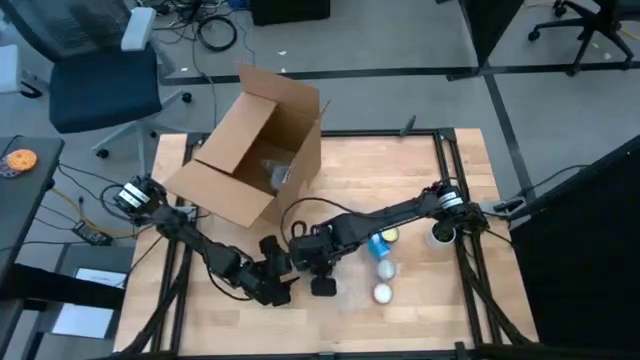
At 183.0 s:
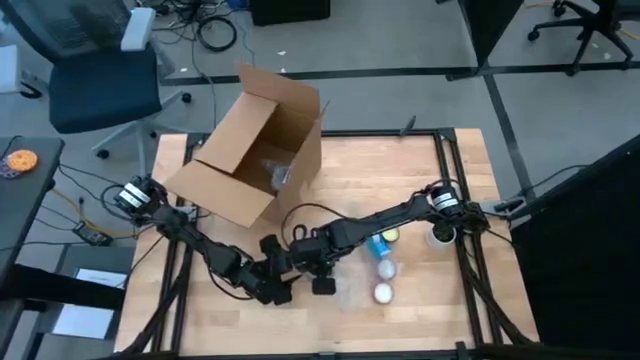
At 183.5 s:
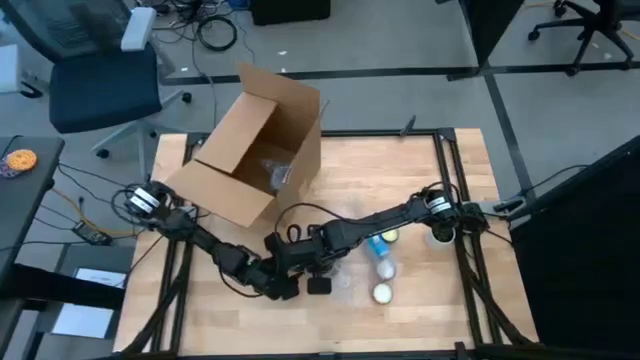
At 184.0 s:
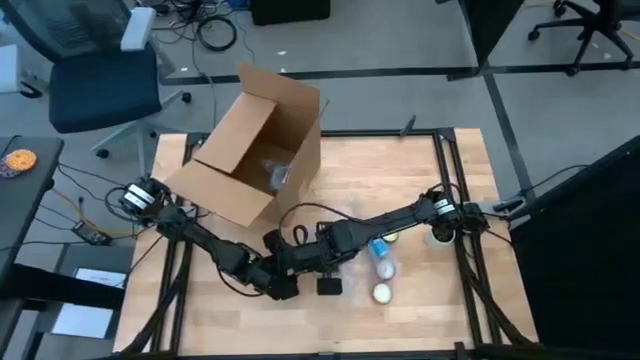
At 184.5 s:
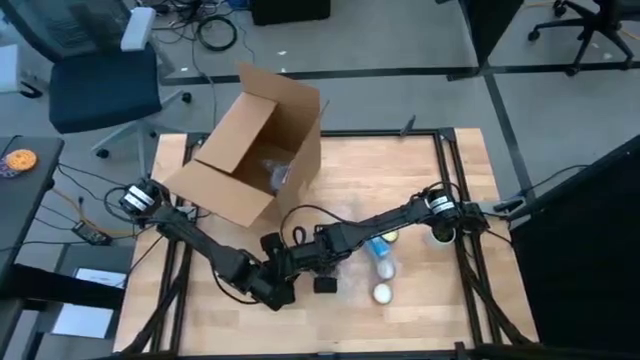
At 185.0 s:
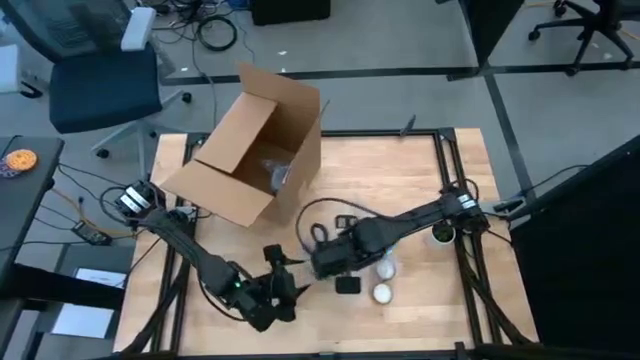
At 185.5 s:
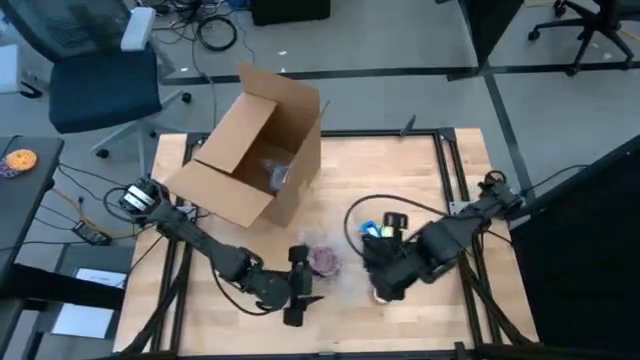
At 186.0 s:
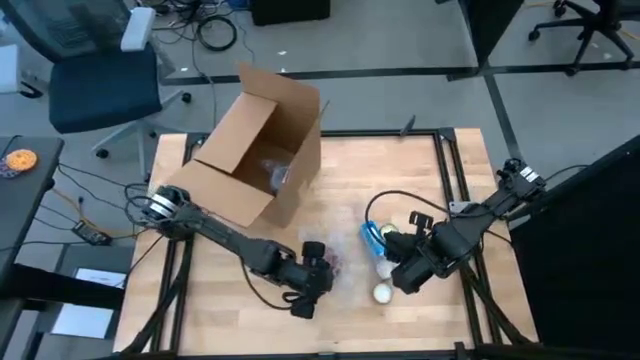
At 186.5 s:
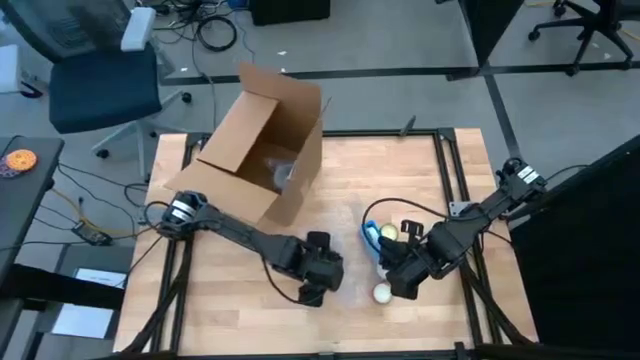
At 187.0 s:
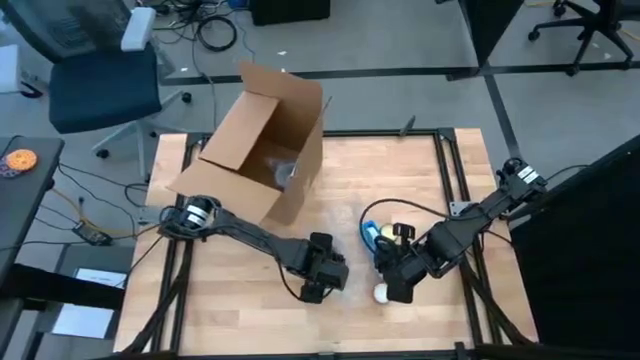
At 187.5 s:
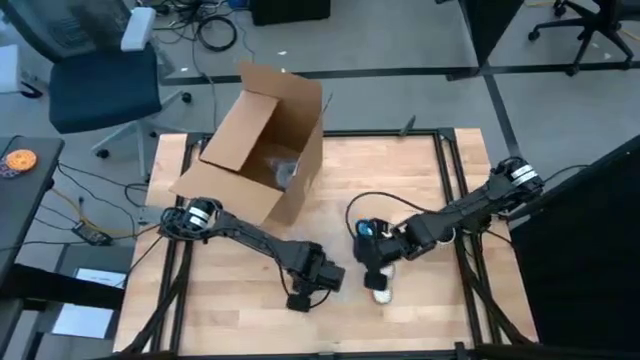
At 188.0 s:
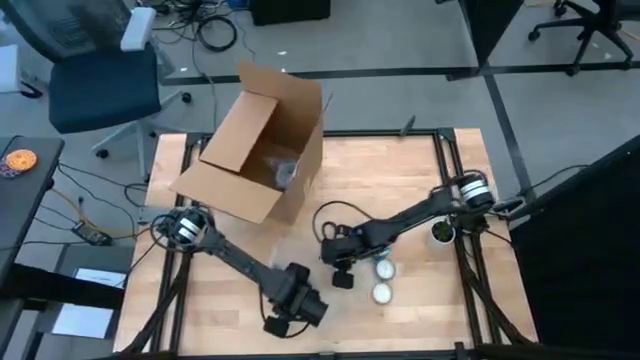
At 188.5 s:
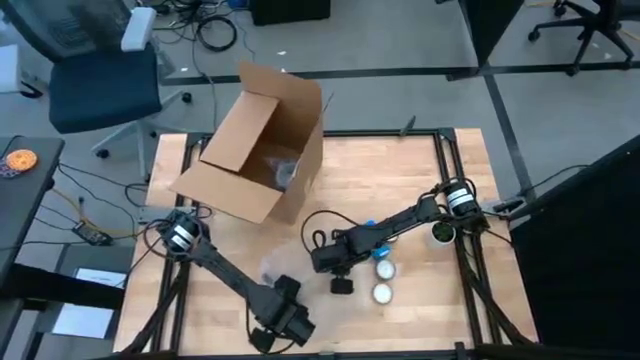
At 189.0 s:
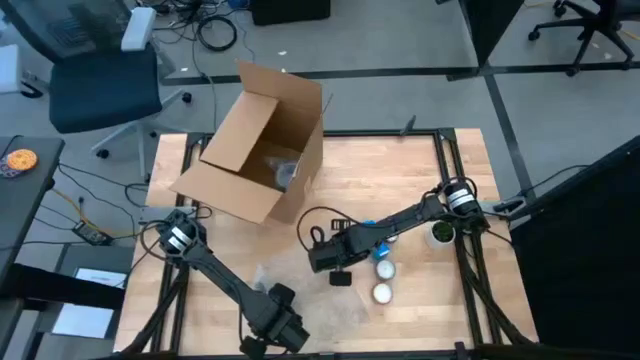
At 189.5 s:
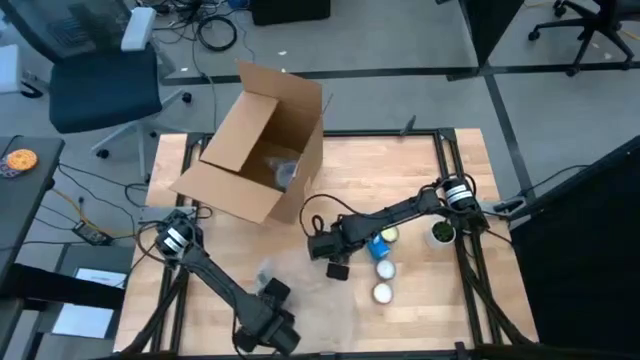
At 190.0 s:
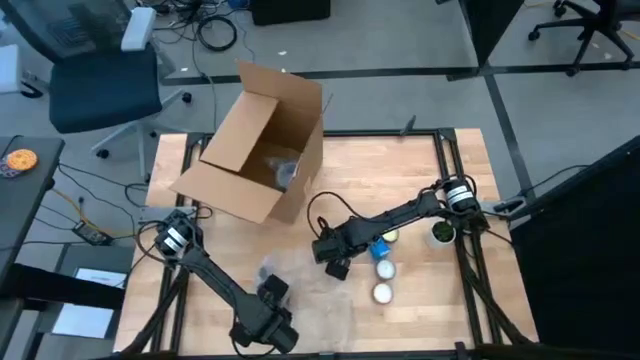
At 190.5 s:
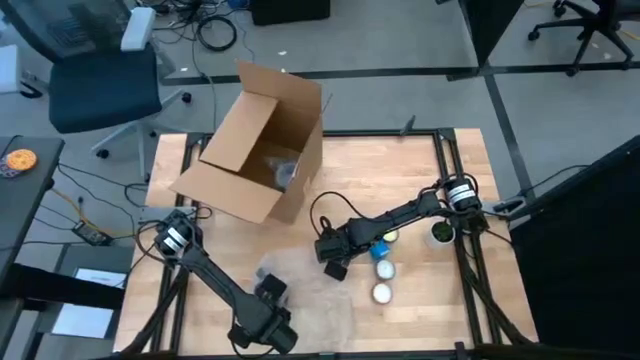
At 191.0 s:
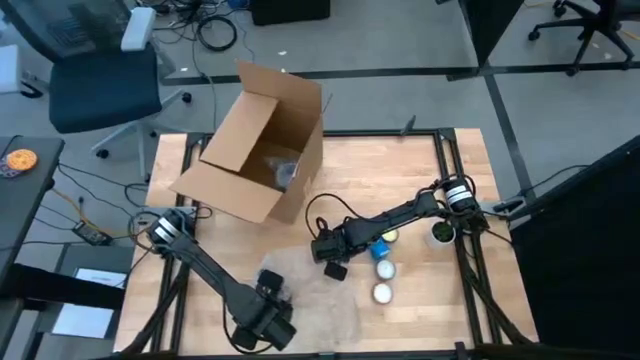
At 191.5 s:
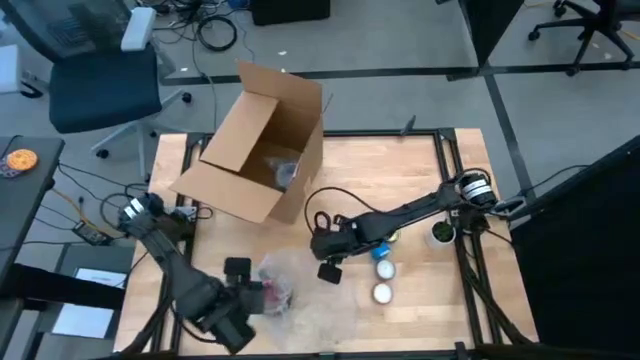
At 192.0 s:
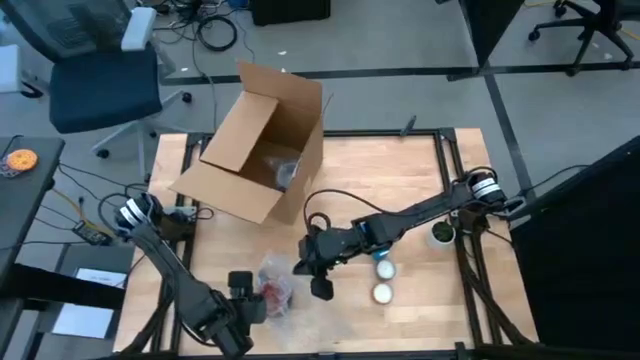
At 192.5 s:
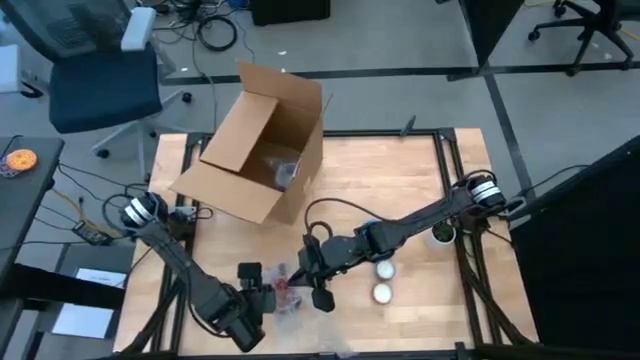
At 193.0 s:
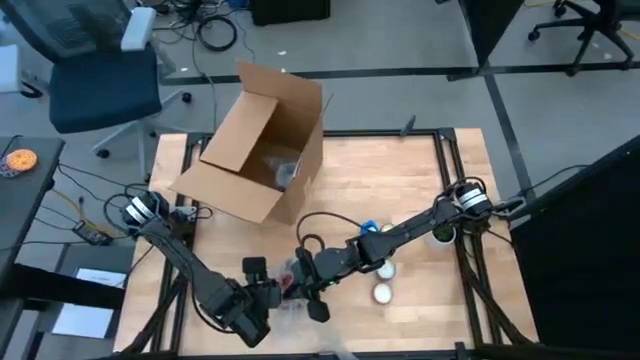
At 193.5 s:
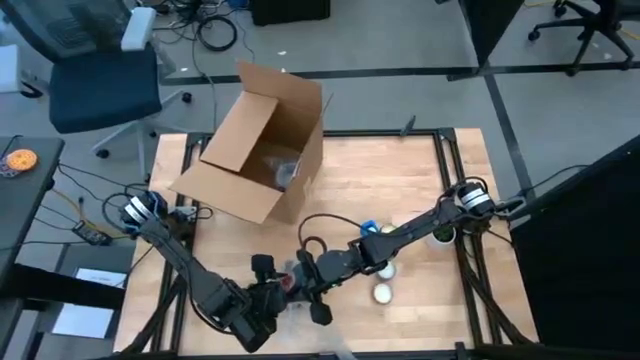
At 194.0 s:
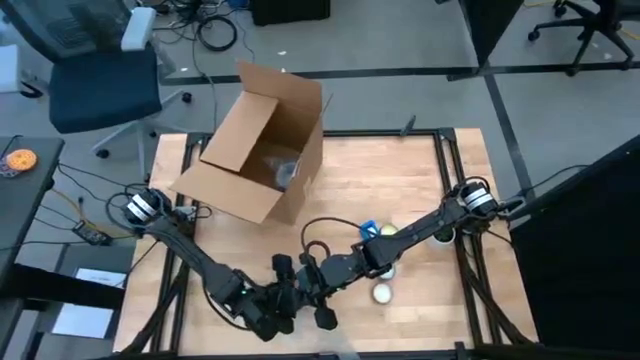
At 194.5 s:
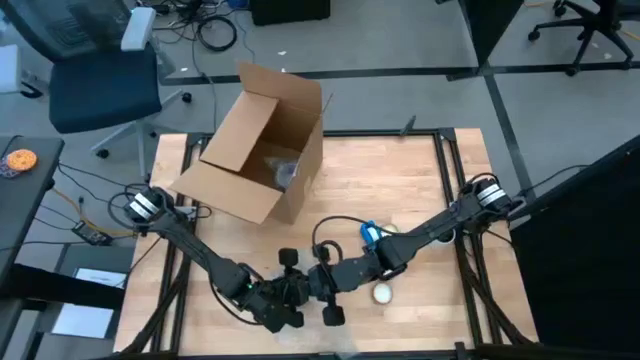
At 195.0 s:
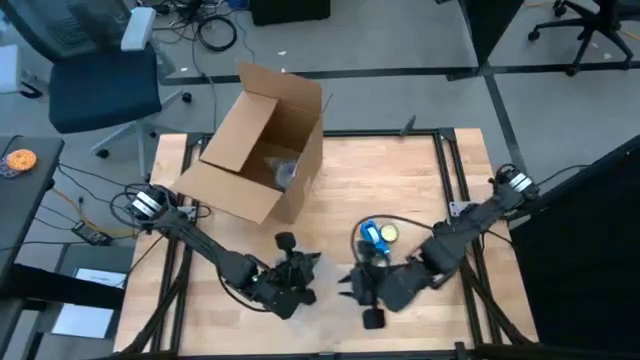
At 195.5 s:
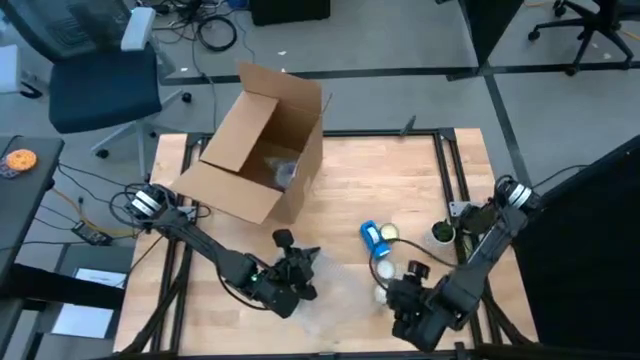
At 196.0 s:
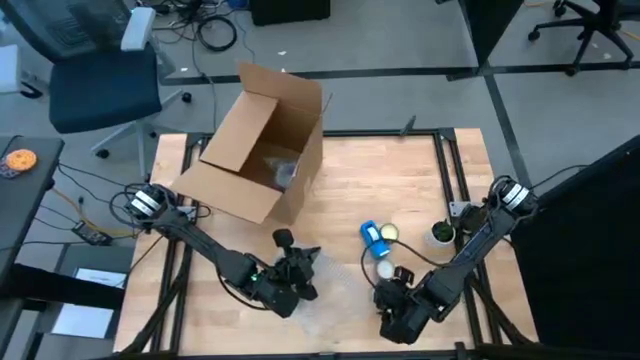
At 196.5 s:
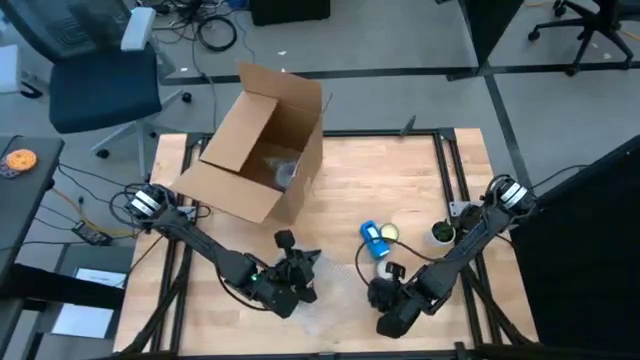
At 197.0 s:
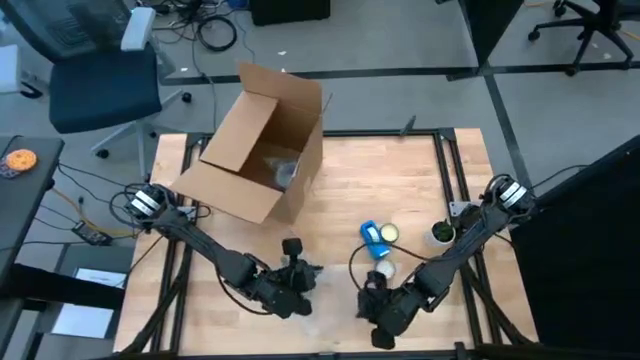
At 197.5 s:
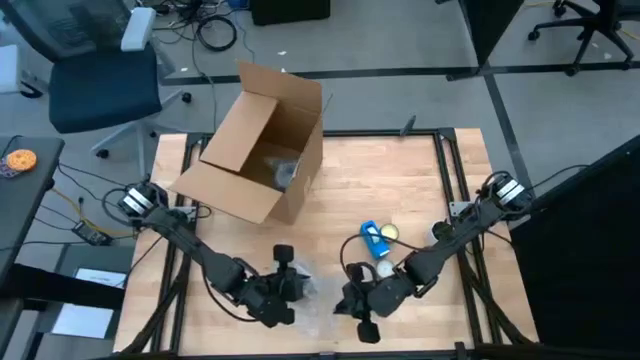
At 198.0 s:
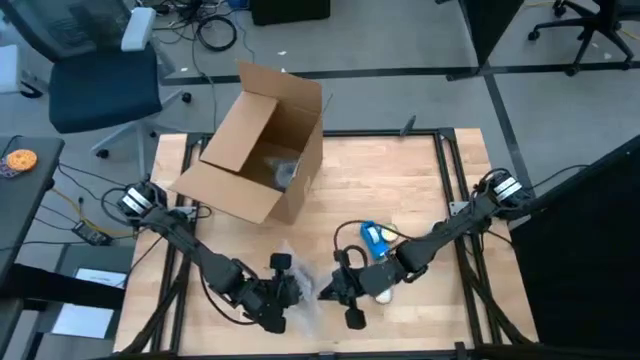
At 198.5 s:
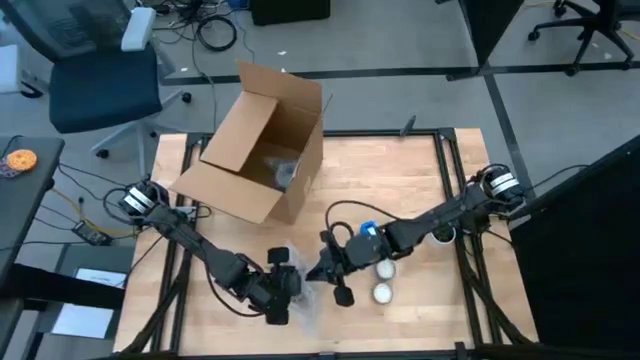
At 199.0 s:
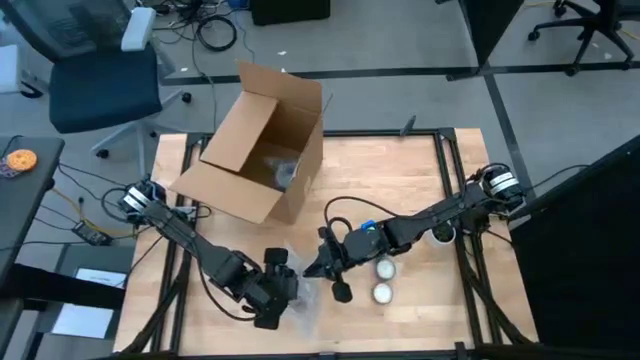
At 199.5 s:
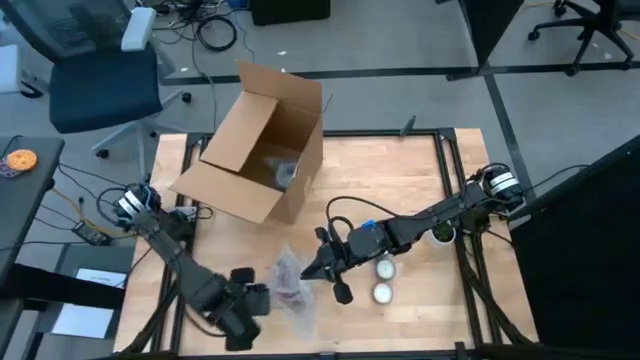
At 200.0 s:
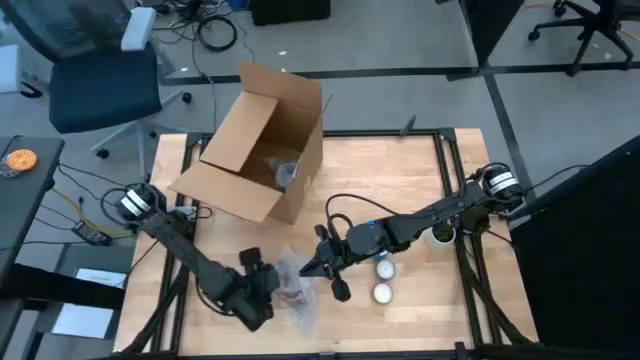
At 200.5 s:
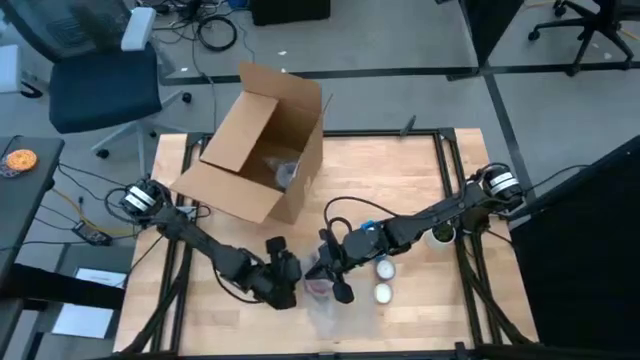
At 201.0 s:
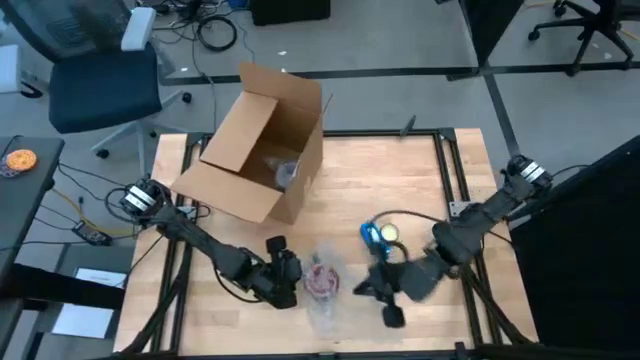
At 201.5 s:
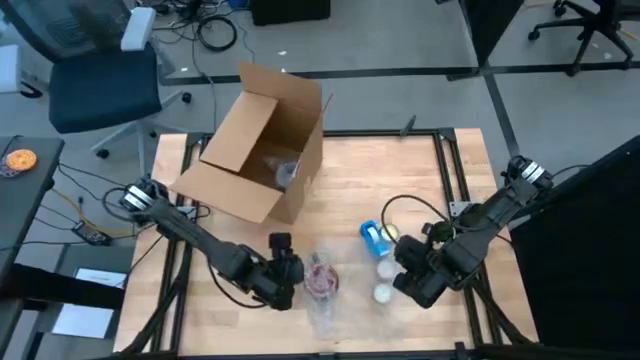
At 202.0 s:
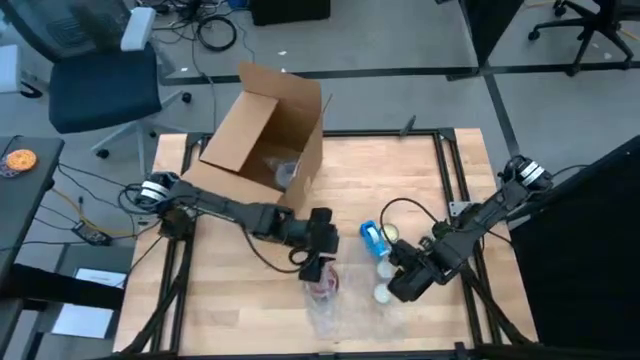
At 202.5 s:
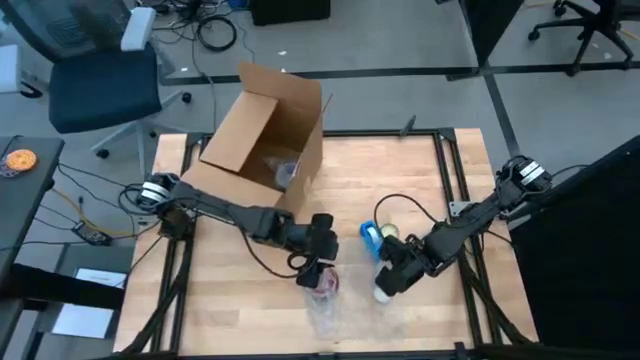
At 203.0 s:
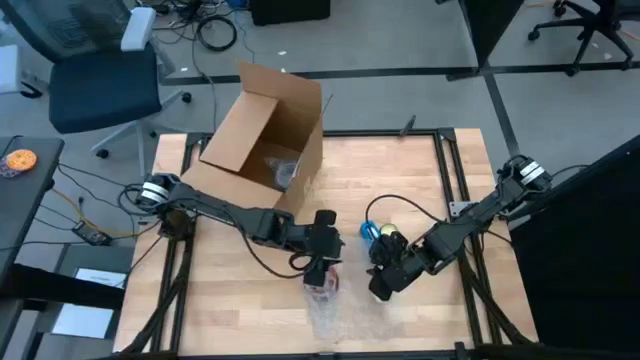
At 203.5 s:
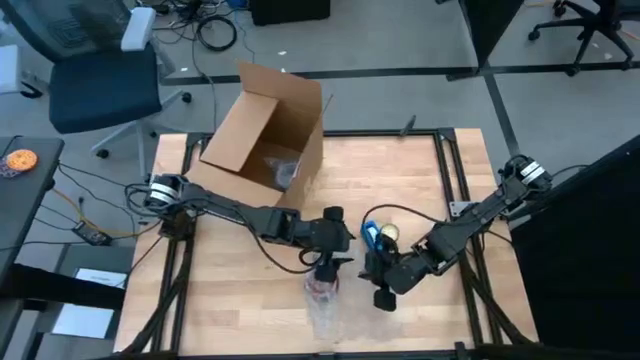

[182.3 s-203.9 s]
Task: wrap mug
Wrap the mug with the bubble wrap
